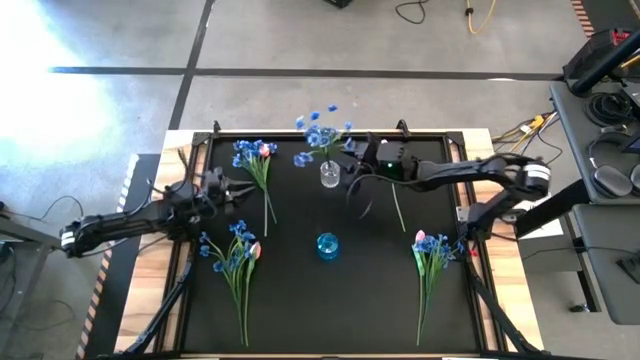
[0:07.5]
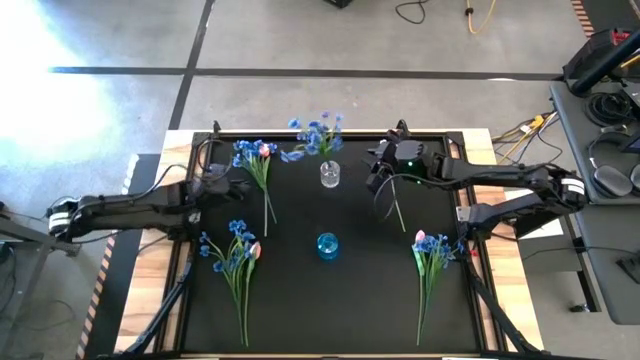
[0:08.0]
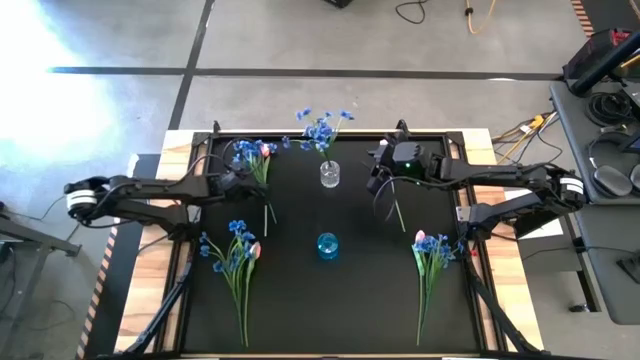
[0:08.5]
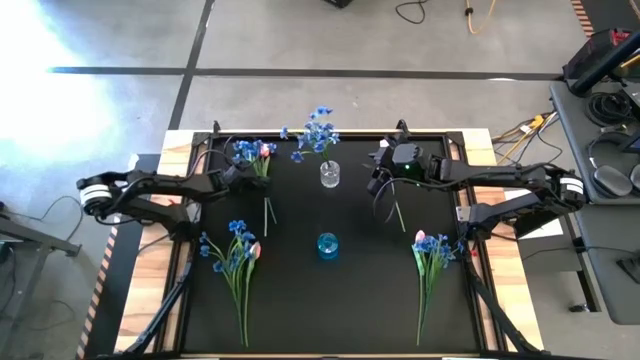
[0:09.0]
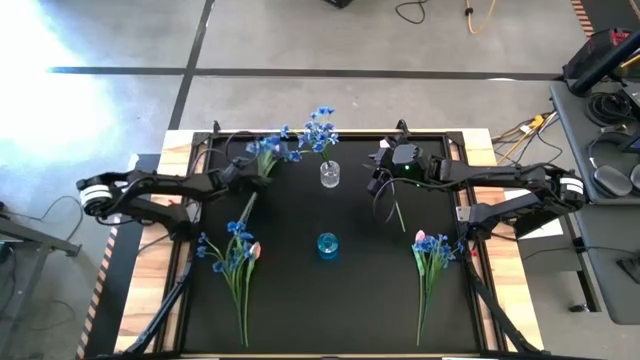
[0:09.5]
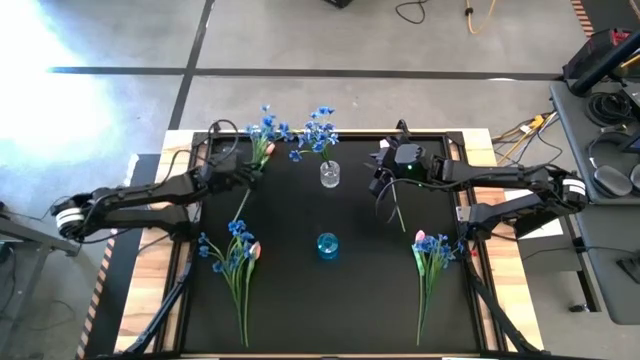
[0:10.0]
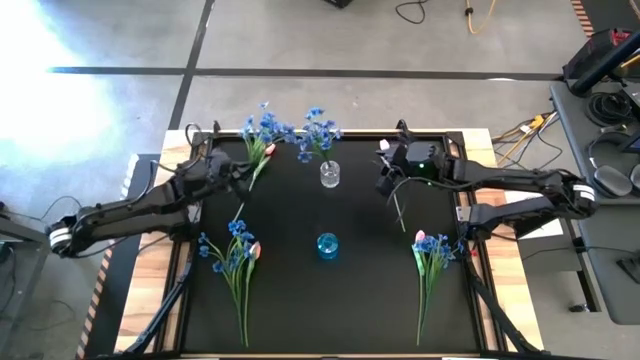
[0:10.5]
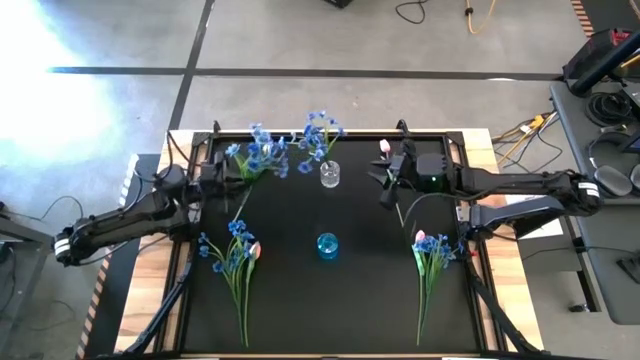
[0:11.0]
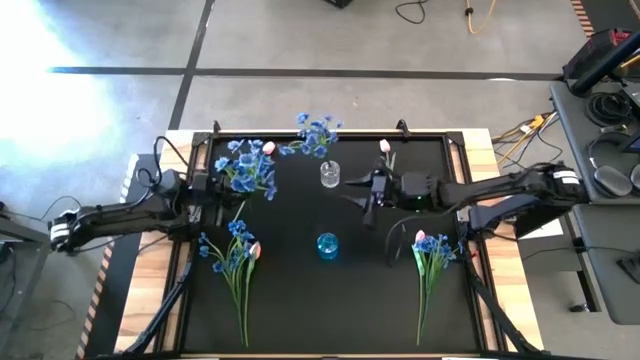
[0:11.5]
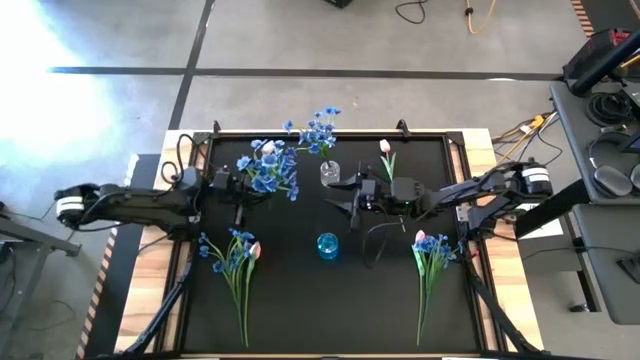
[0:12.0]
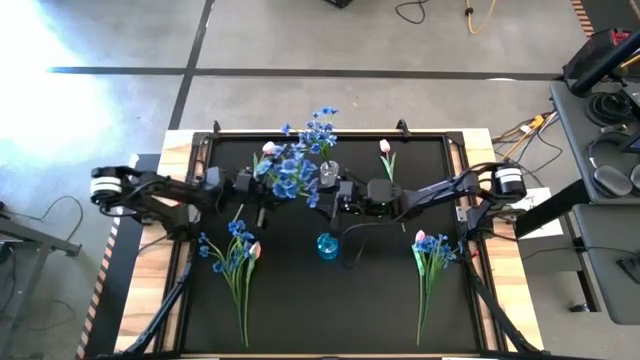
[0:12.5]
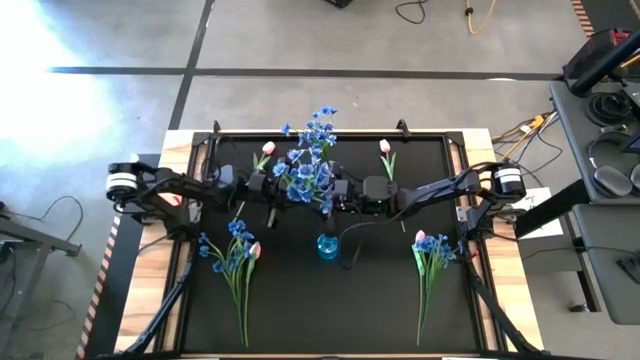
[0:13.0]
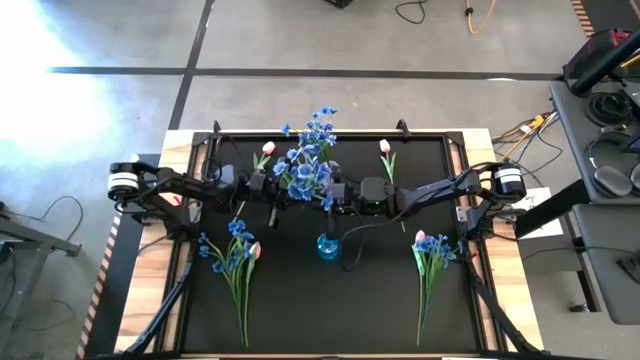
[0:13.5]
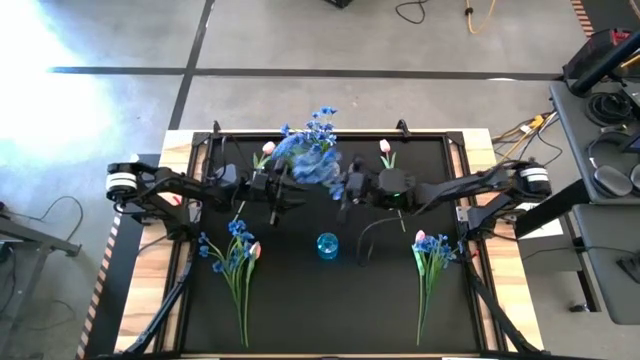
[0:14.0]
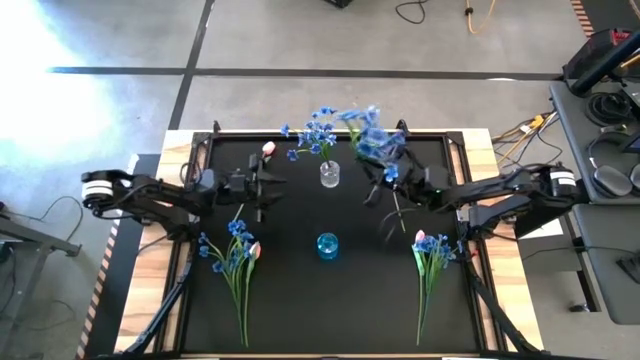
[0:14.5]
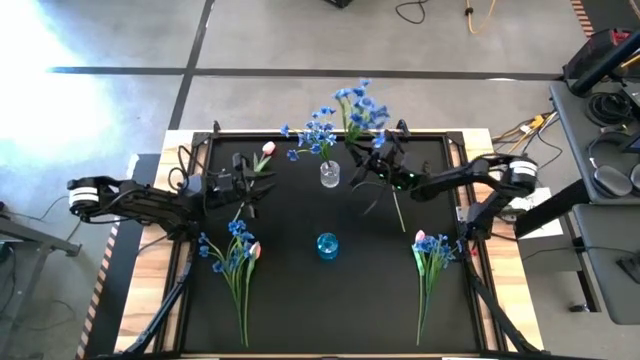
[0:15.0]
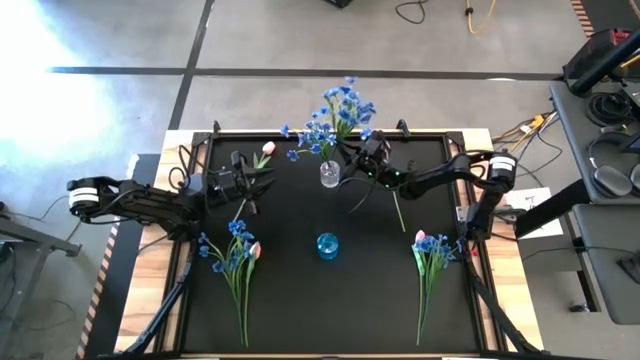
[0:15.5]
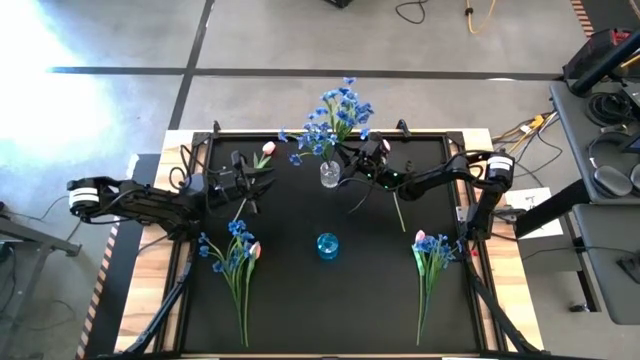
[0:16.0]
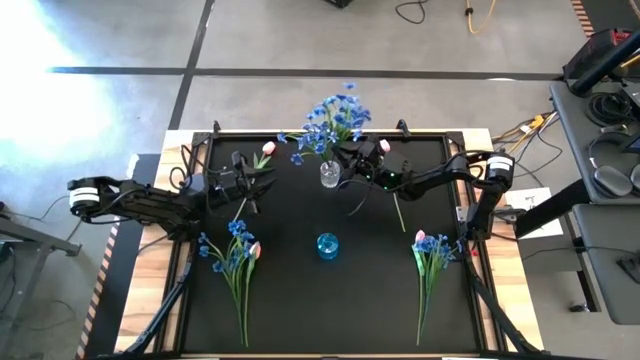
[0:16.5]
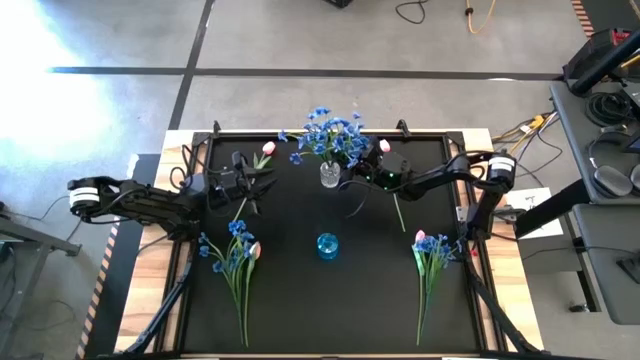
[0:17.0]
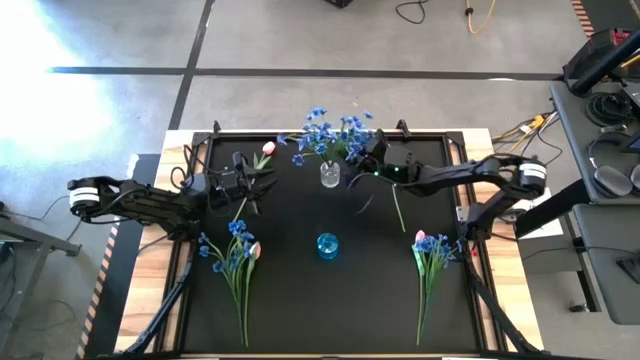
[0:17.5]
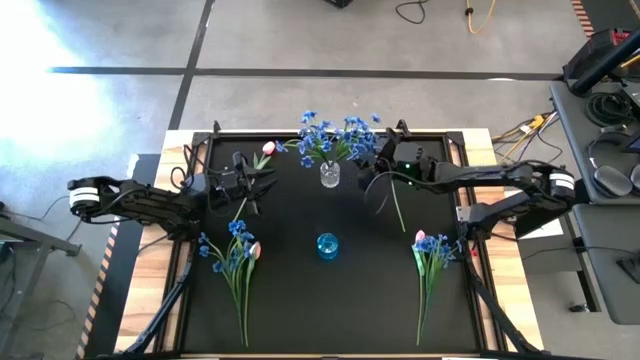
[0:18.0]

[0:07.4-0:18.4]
Task: Sort flowers into vase by color
Put the top blue flowers into the transparent vase

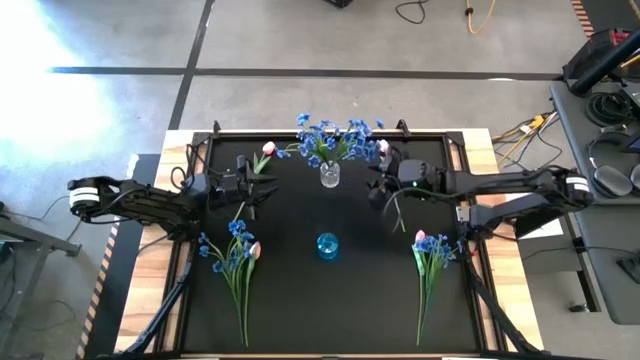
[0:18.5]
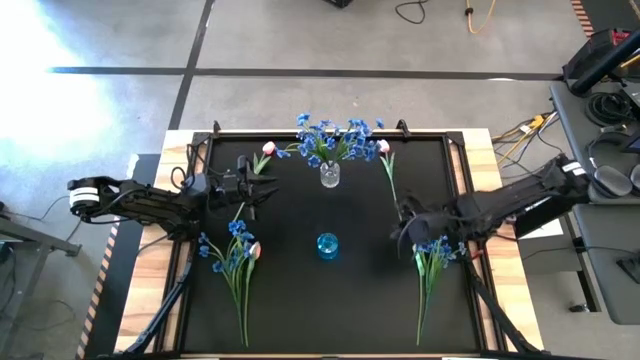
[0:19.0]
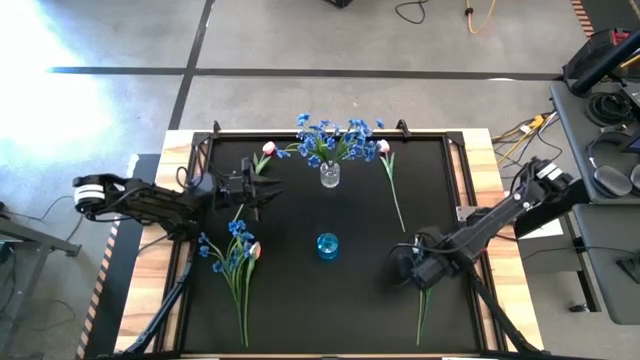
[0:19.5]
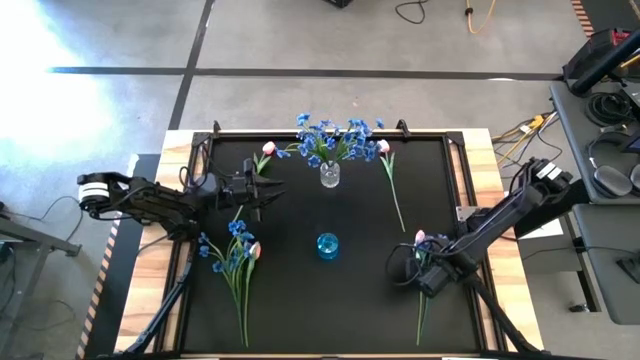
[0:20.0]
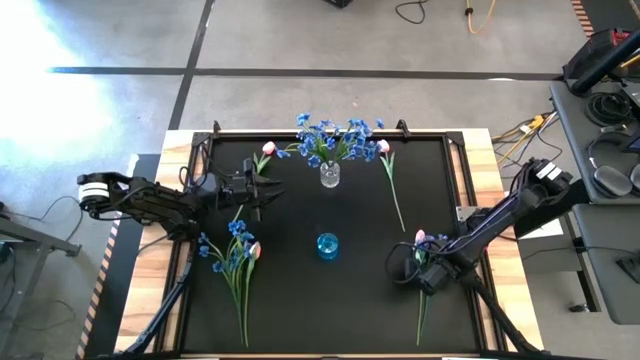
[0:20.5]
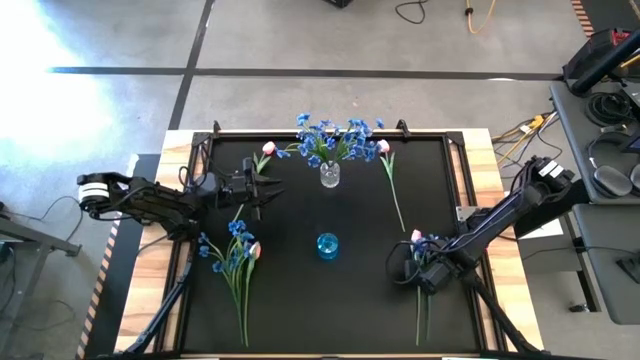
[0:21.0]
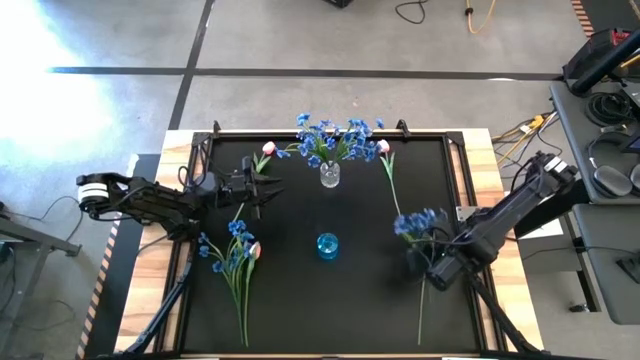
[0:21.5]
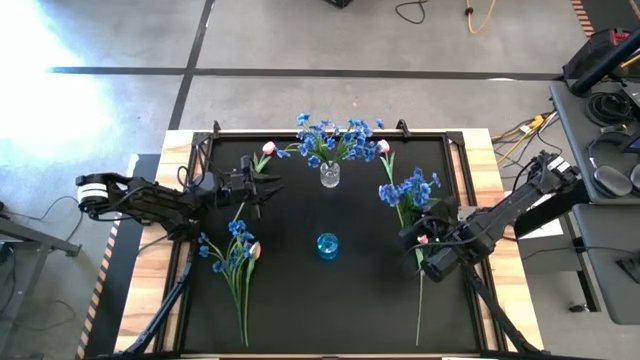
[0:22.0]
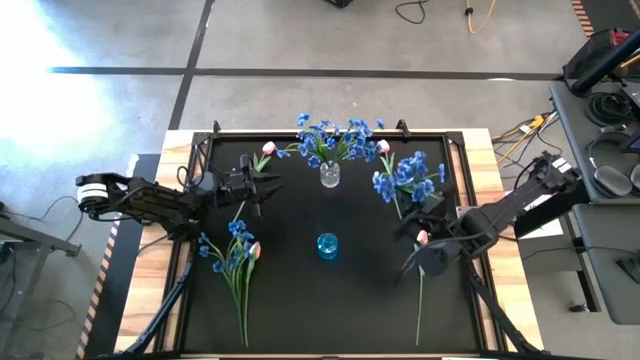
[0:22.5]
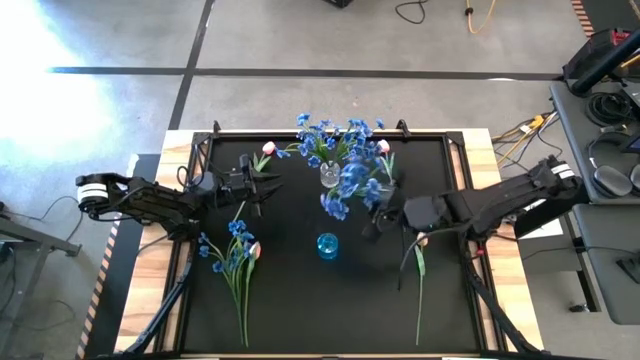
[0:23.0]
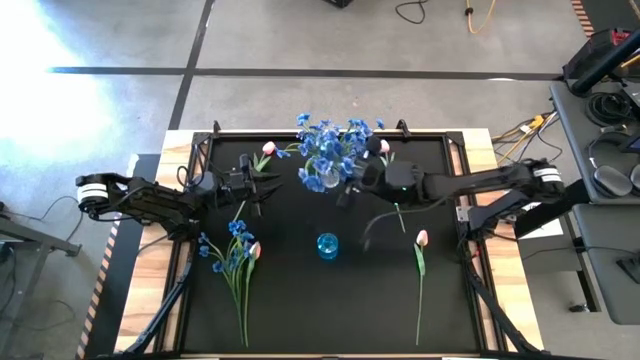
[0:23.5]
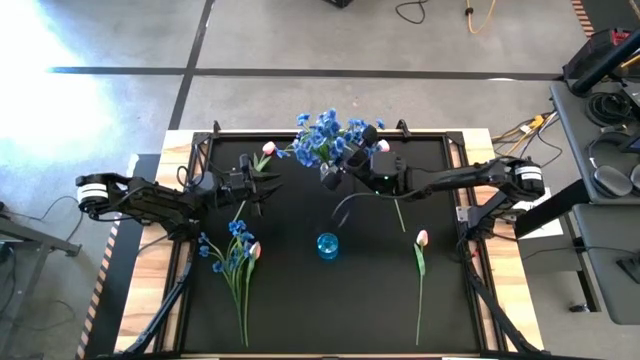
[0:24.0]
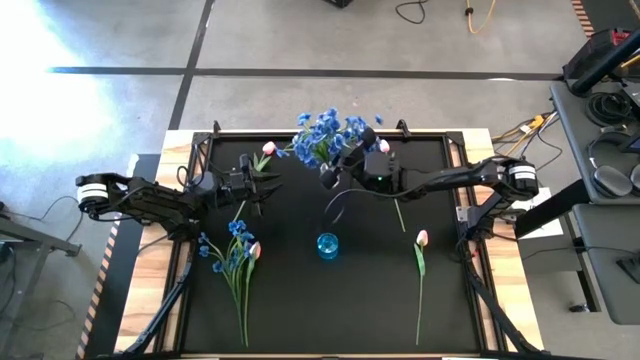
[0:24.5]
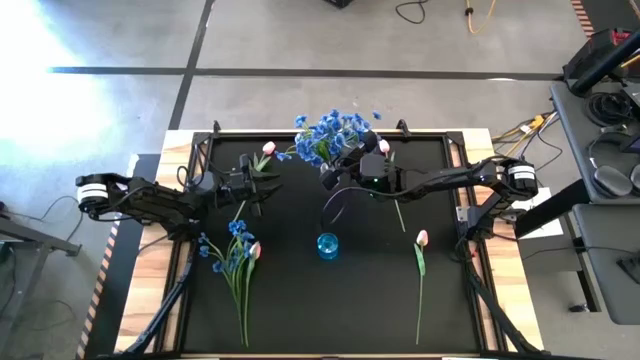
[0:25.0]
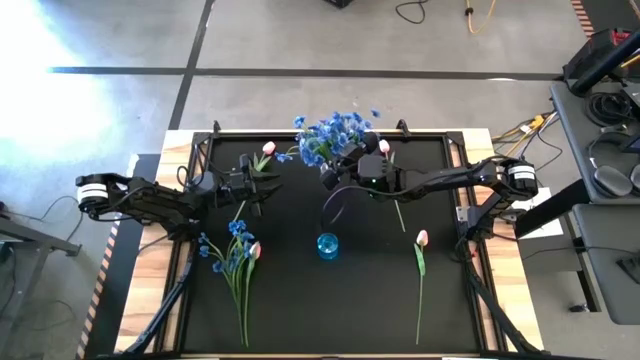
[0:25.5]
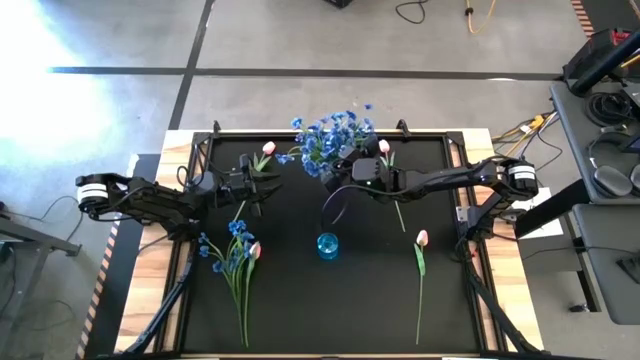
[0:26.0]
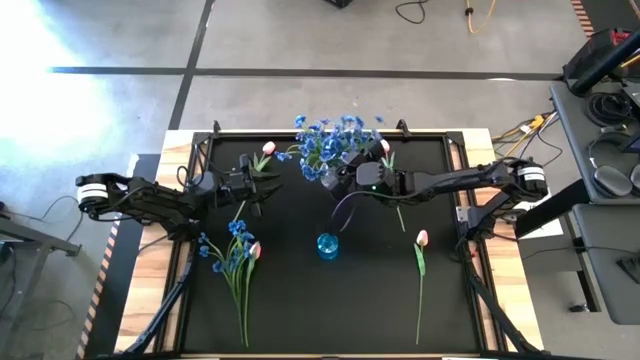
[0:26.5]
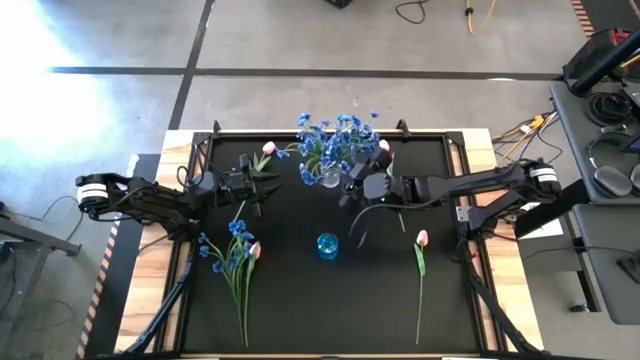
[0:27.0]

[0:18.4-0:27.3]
Put the right blue flowers into the transparent vase
